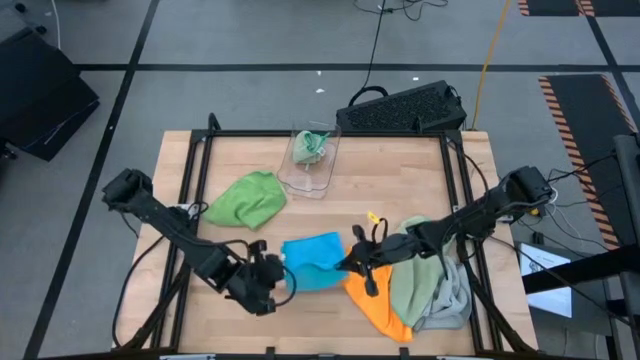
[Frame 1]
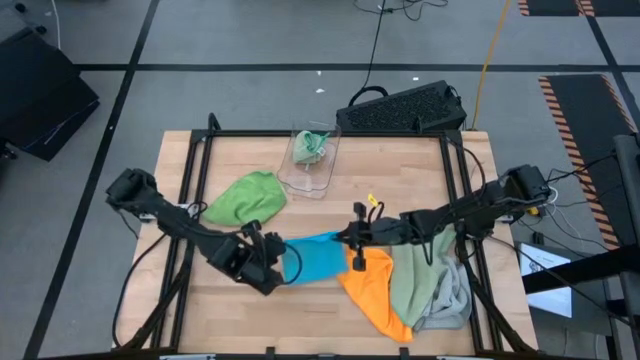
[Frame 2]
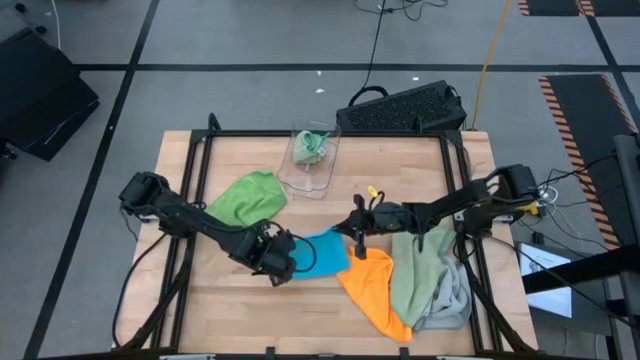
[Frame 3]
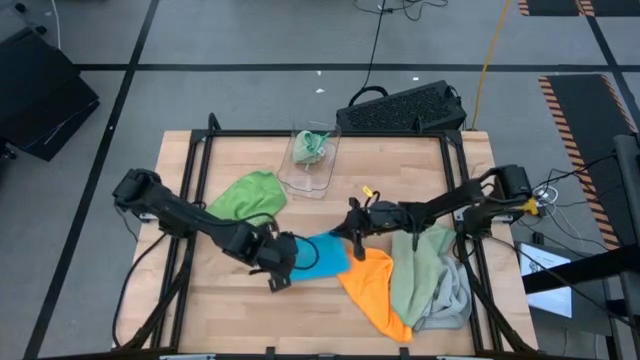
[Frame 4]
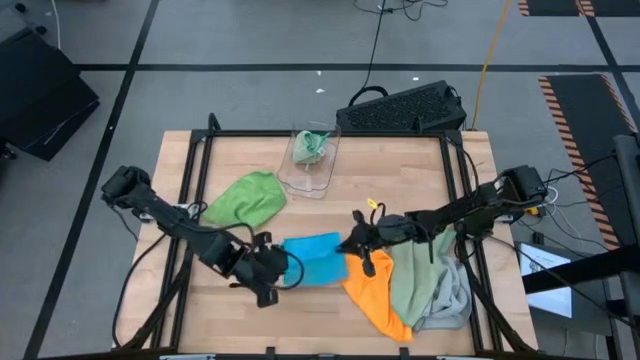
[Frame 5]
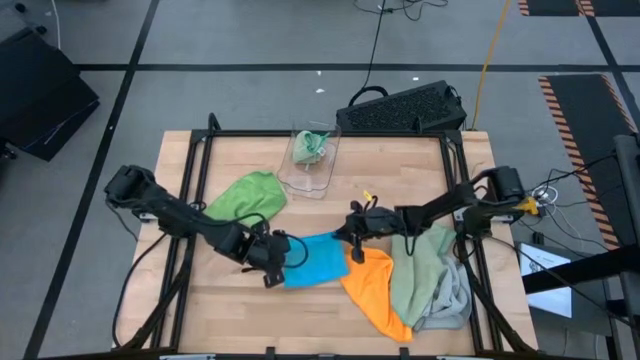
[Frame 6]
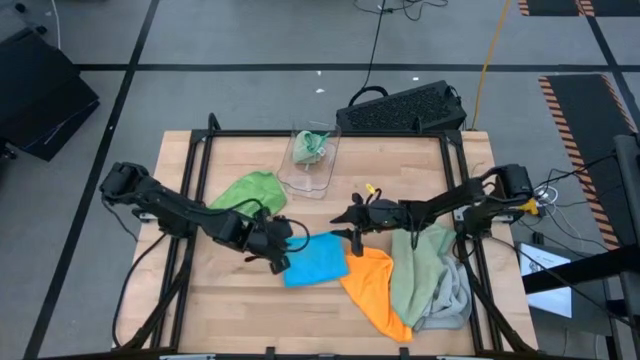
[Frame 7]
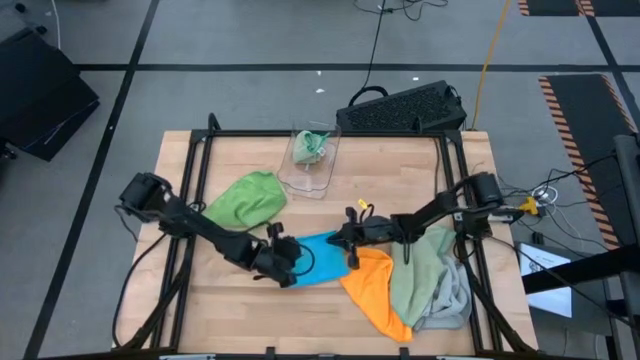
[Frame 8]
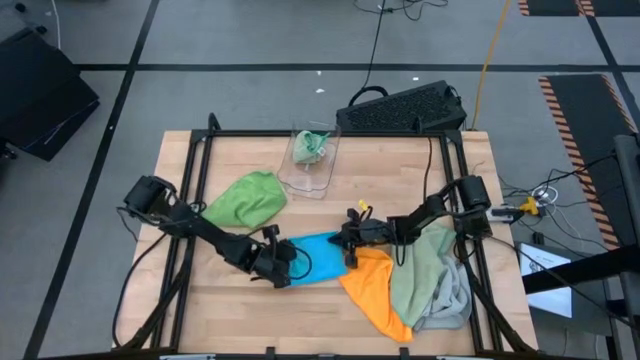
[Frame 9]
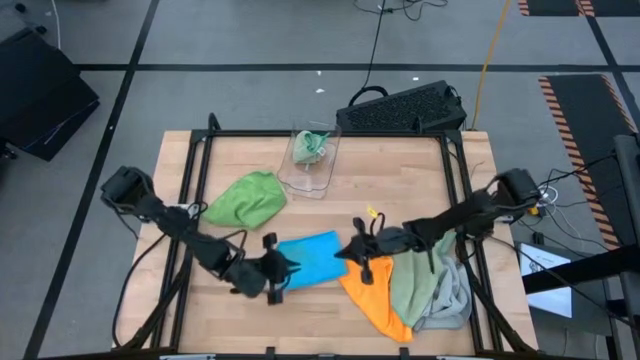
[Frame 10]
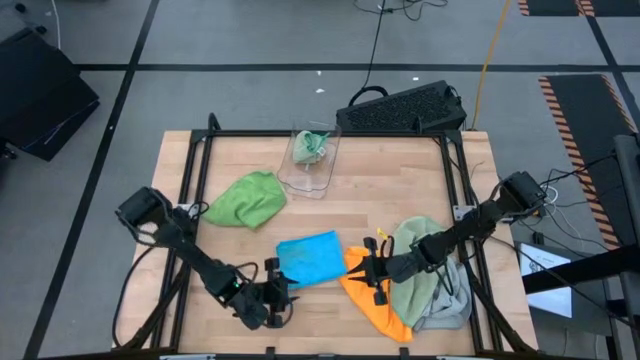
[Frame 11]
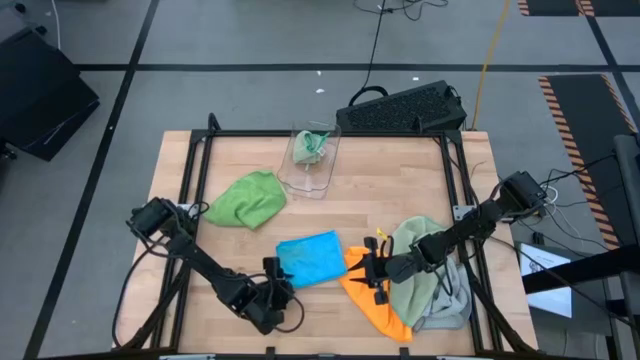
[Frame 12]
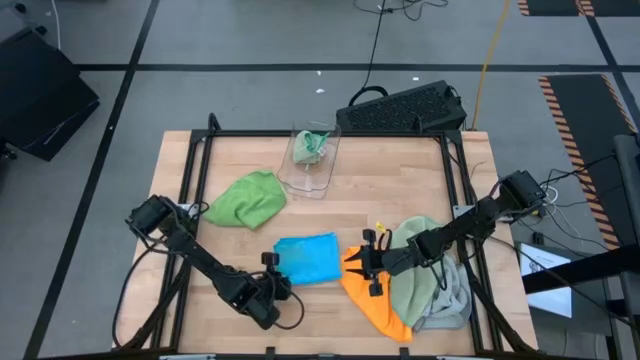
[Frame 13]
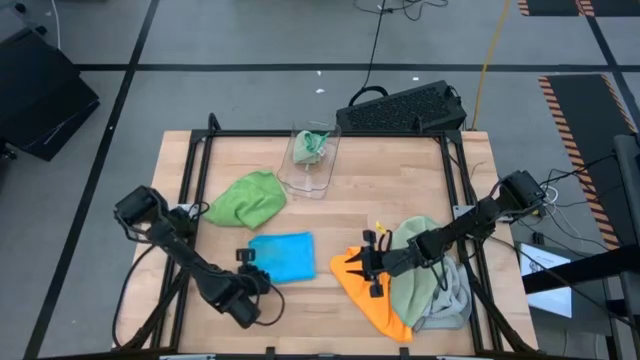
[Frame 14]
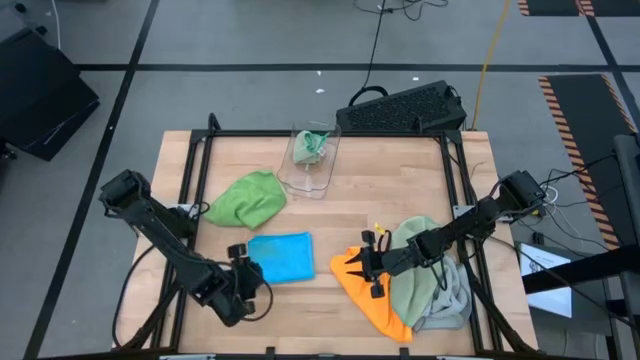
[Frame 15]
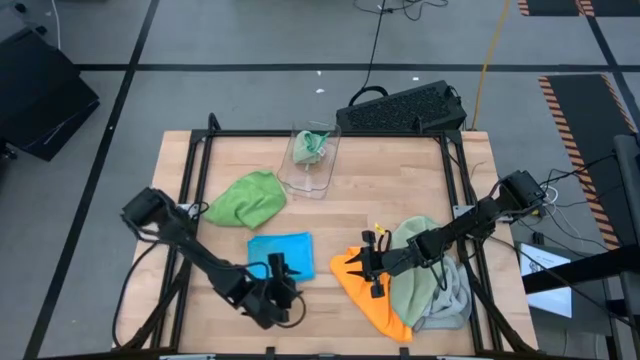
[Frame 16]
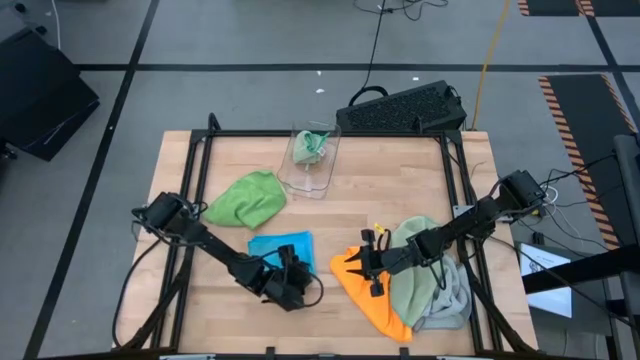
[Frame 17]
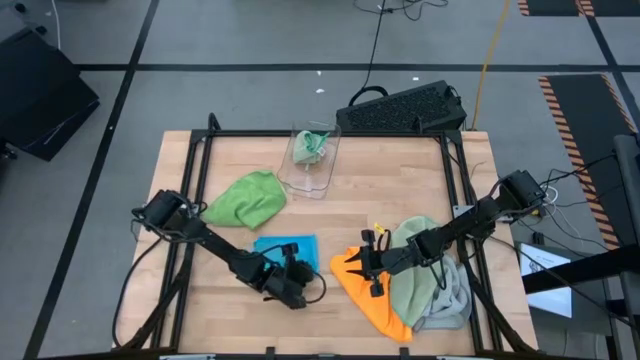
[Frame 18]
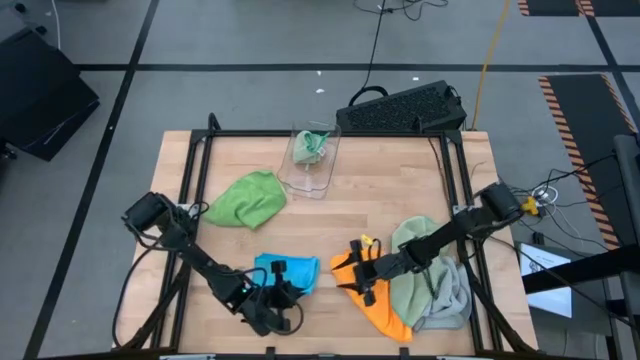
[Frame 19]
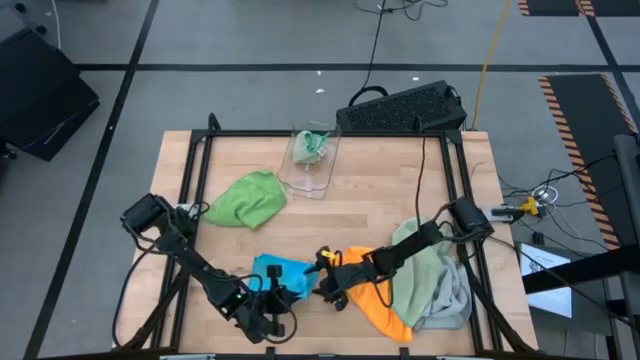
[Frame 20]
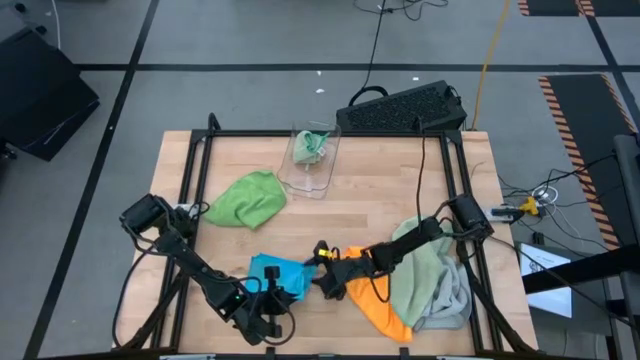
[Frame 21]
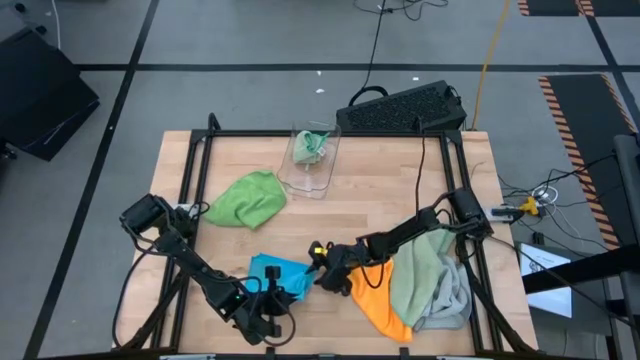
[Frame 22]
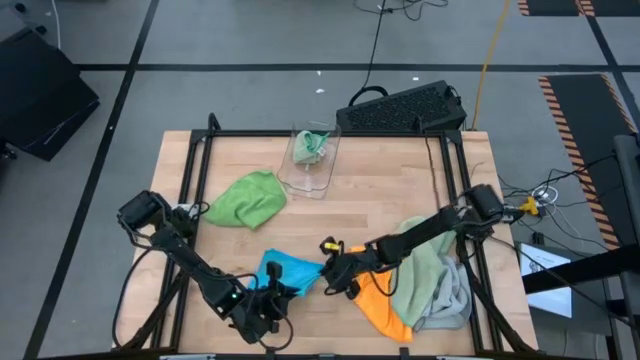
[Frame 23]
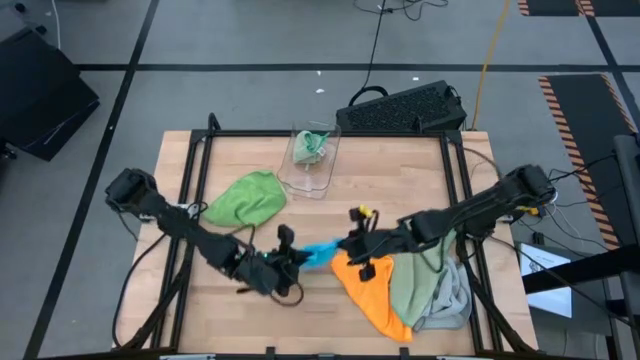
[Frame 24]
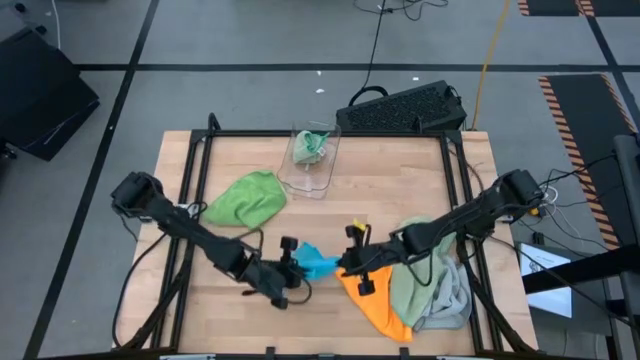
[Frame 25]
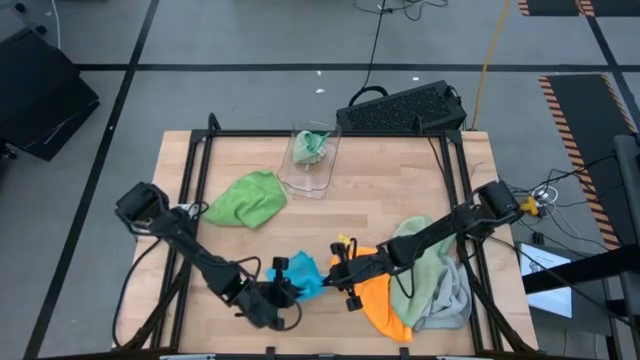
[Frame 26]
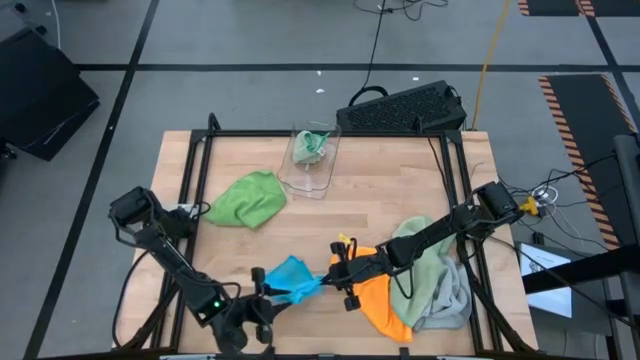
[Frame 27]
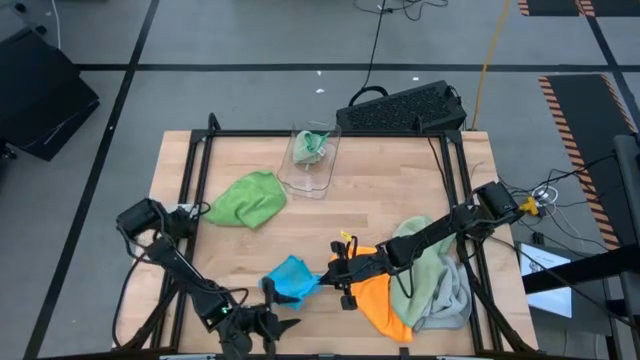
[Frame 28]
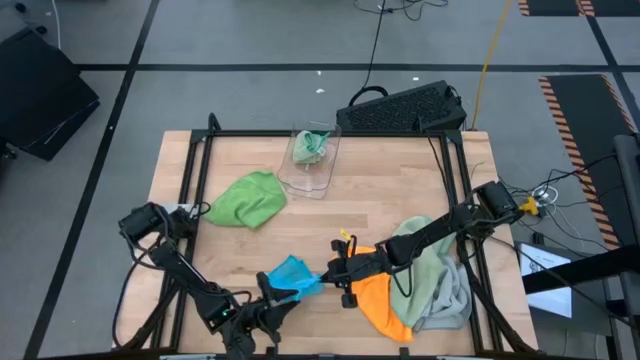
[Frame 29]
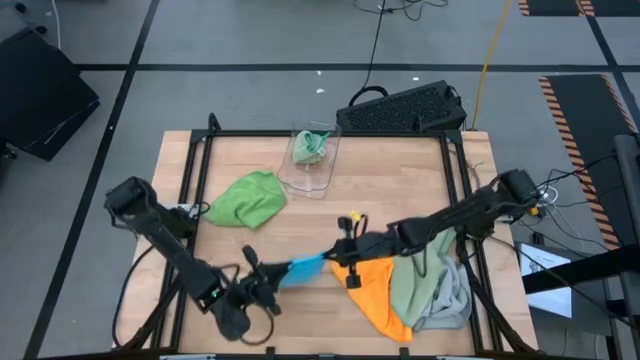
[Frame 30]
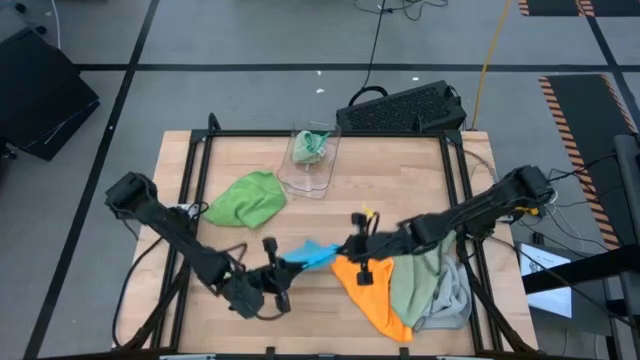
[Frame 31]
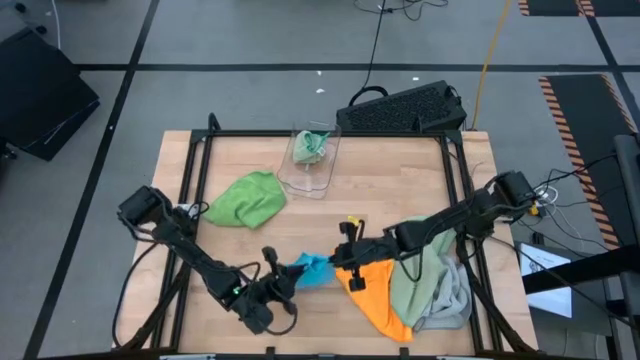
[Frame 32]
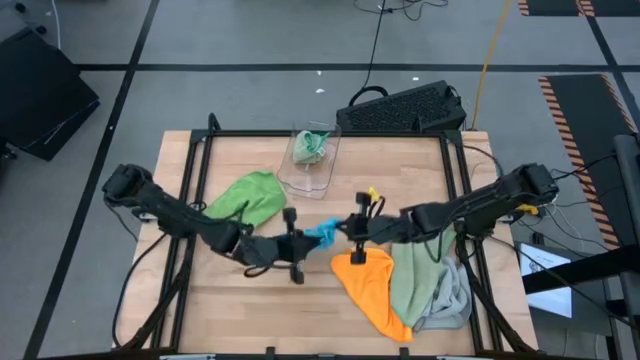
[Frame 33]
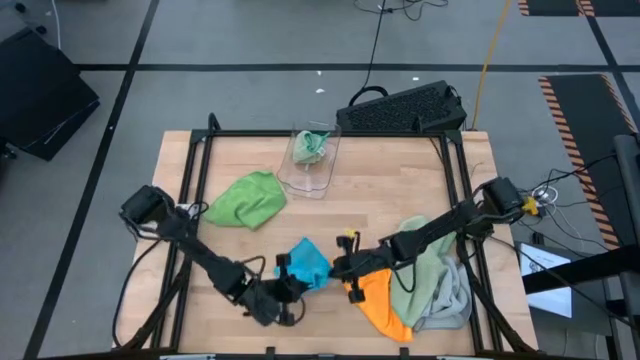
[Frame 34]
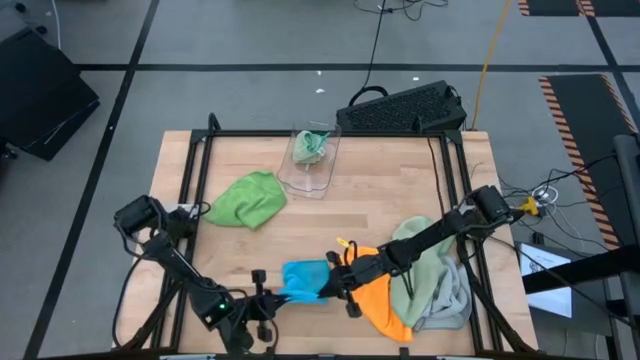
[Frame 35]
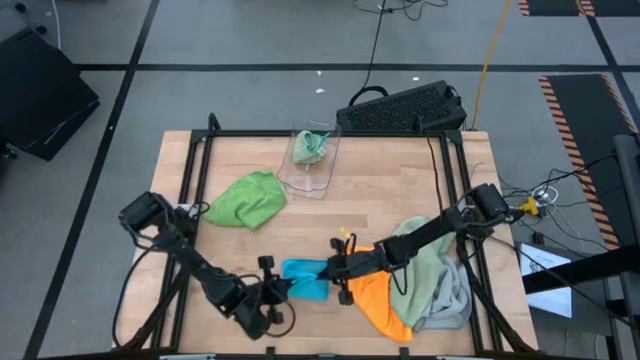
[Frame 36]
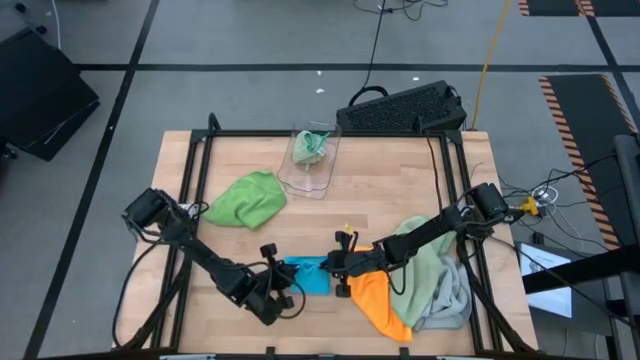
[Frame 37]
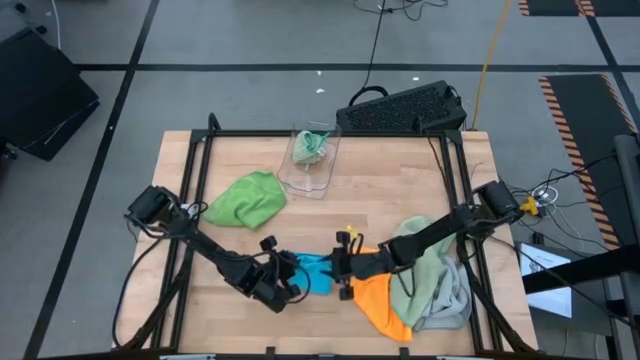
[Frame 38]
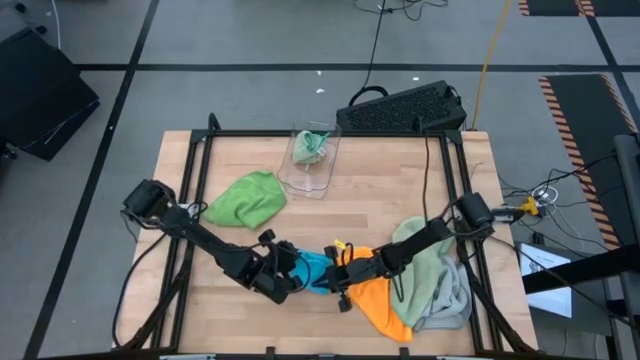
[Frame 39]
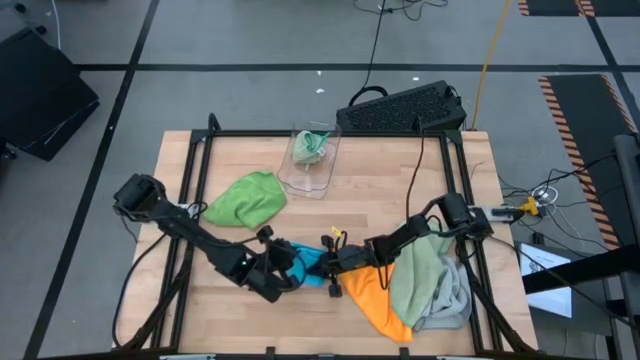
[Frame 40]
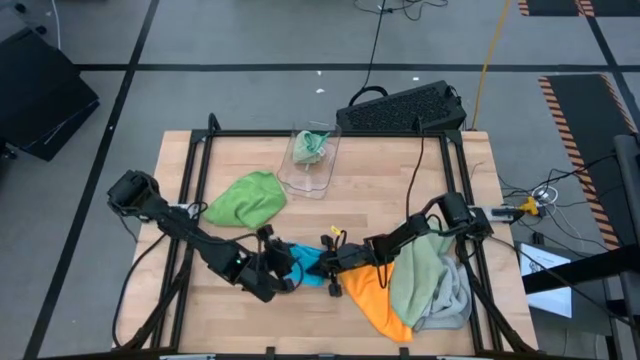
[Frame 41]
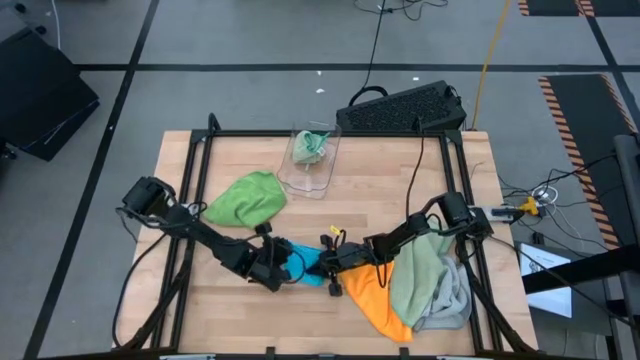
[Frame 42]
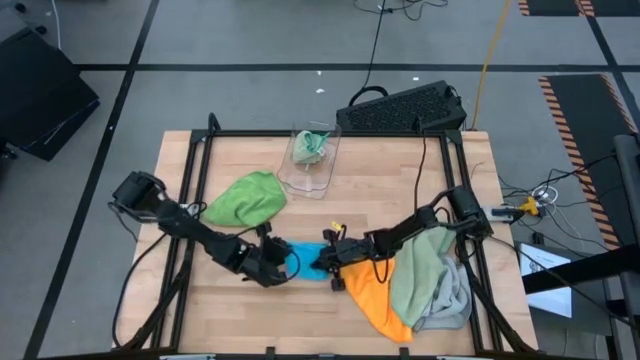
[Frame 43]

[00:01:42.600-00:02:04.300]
Task: Fold microfiber towels
Fold the blue towel
